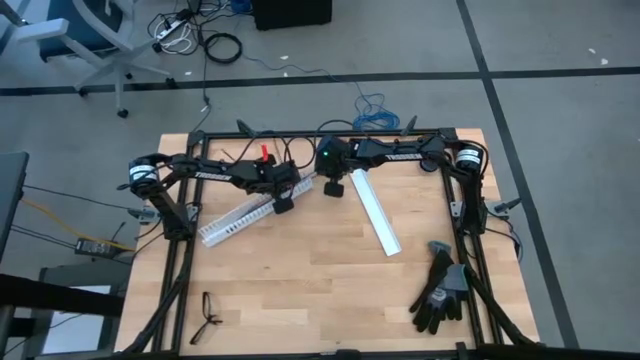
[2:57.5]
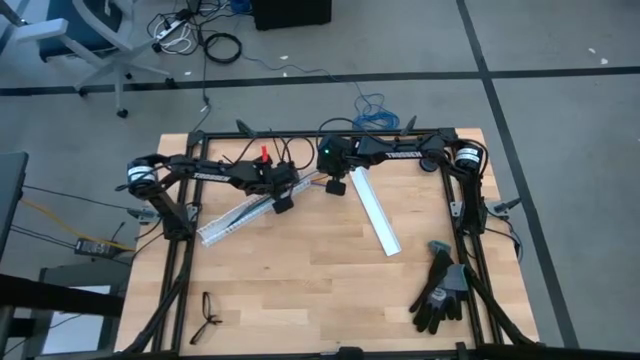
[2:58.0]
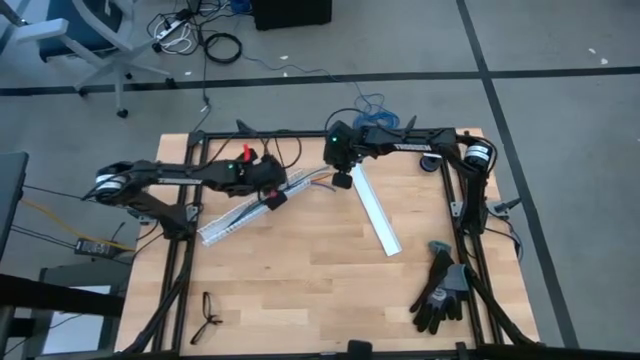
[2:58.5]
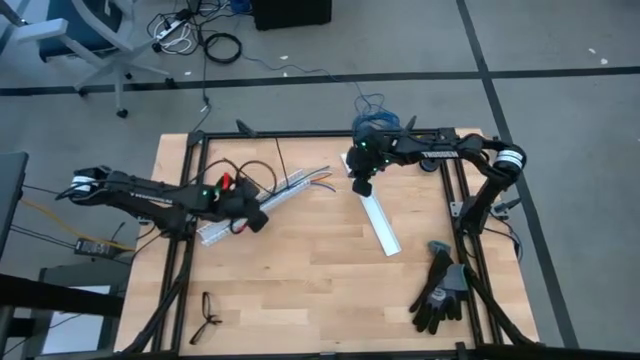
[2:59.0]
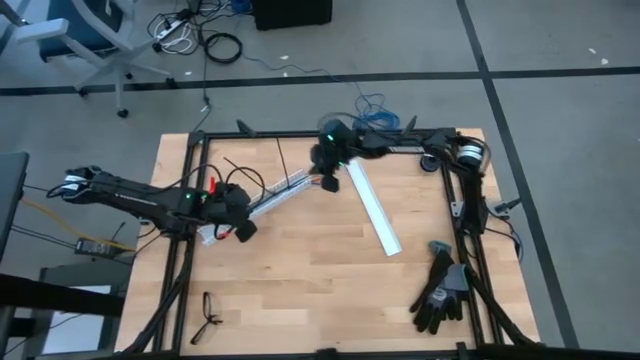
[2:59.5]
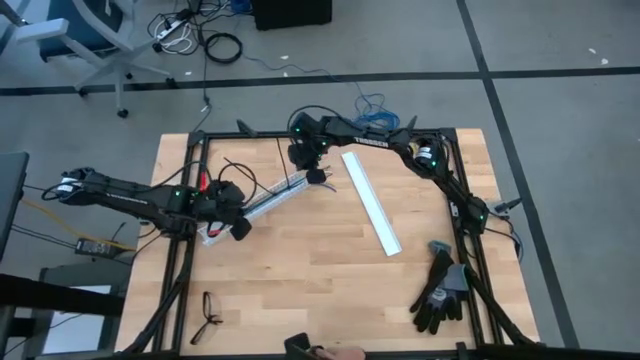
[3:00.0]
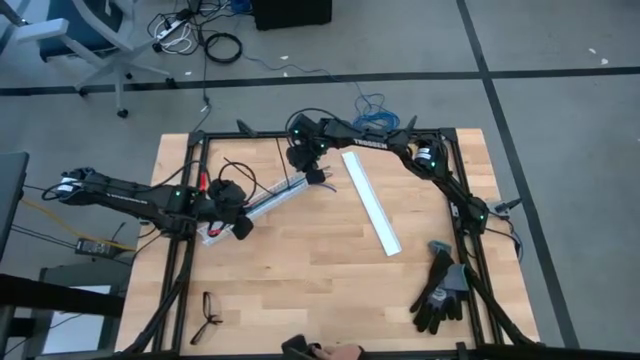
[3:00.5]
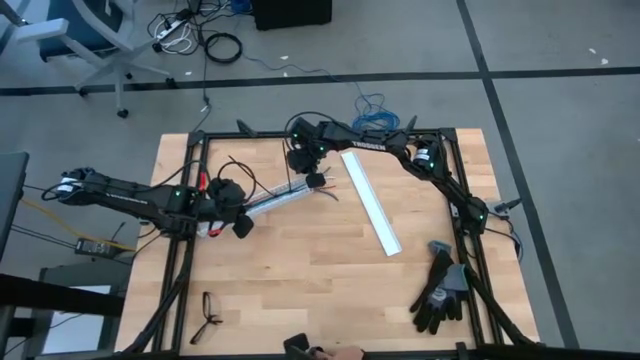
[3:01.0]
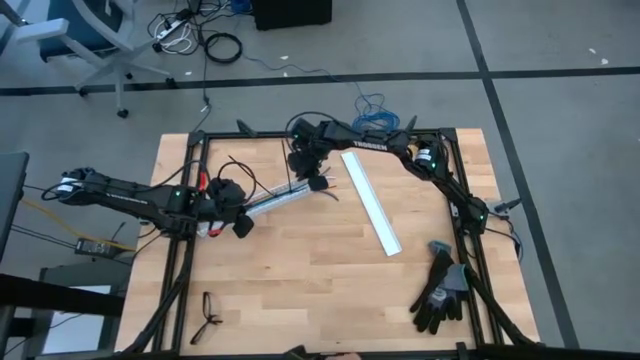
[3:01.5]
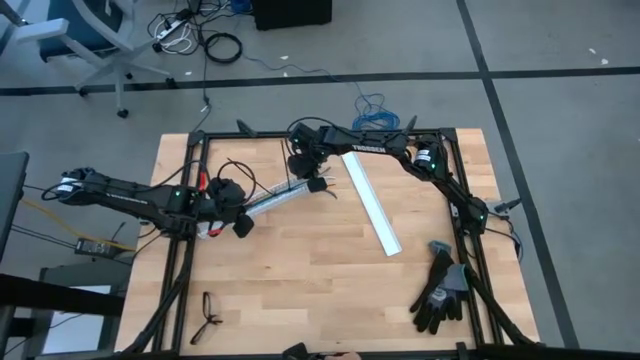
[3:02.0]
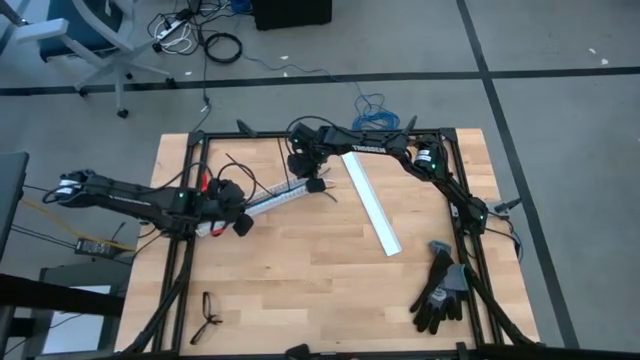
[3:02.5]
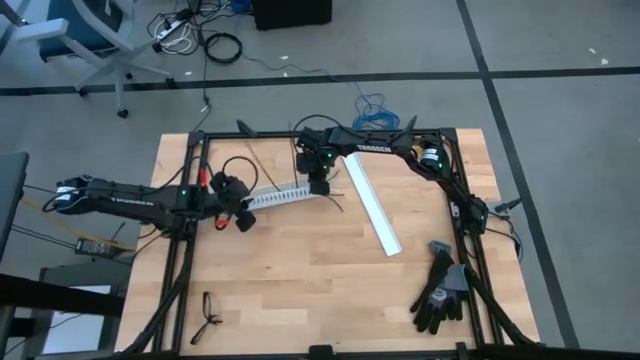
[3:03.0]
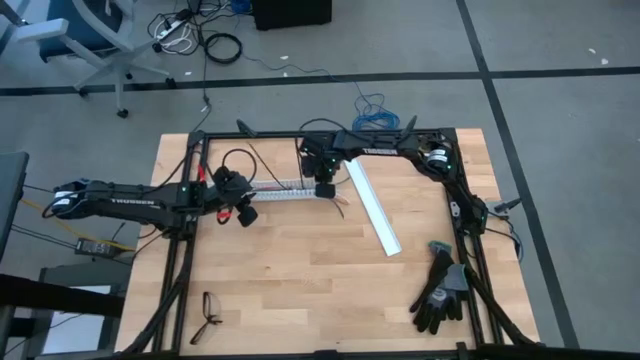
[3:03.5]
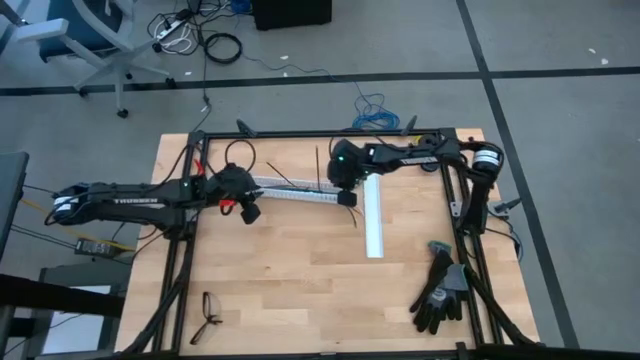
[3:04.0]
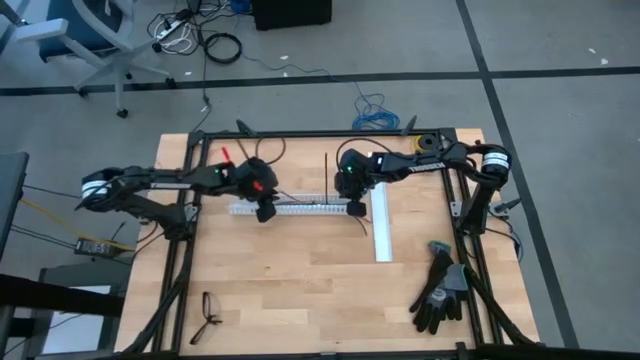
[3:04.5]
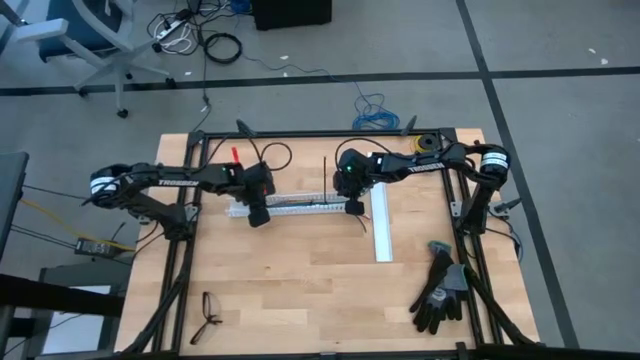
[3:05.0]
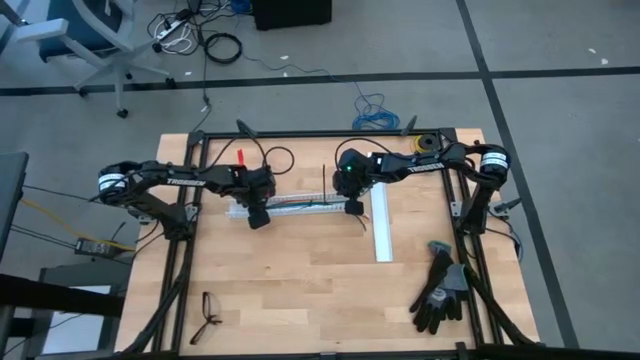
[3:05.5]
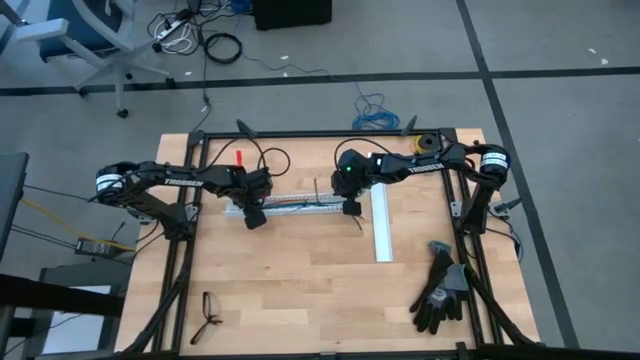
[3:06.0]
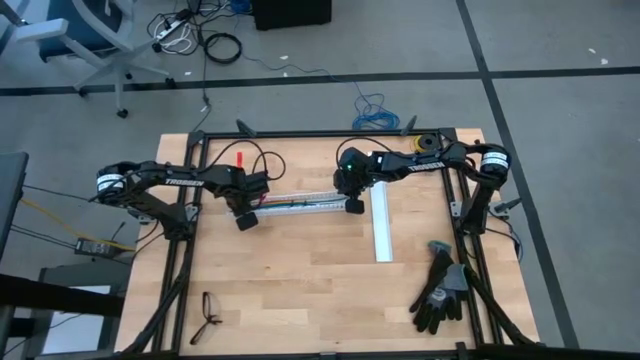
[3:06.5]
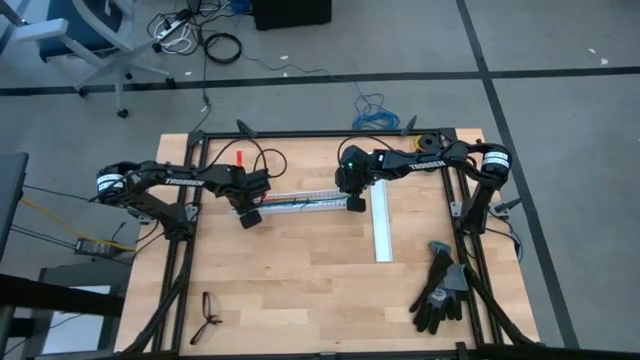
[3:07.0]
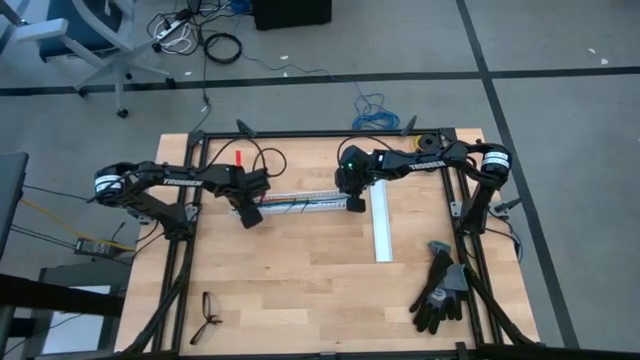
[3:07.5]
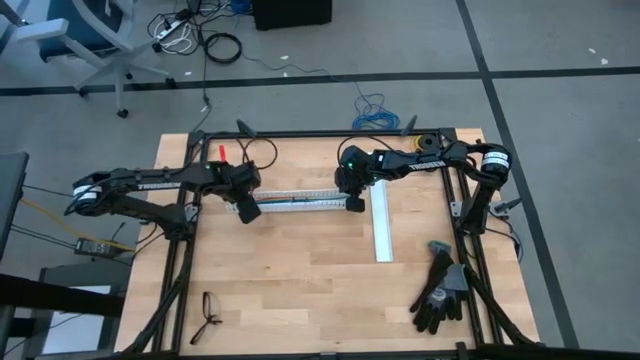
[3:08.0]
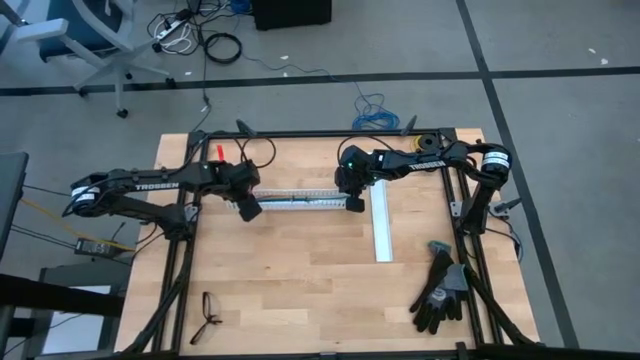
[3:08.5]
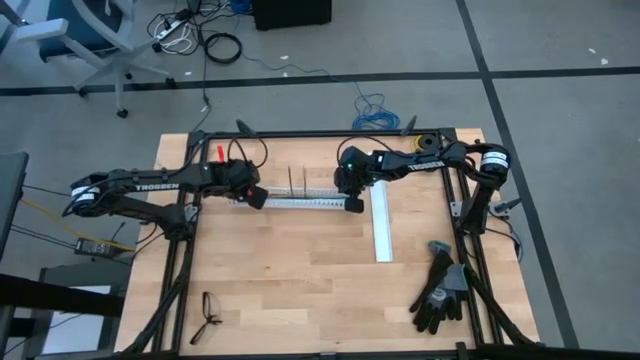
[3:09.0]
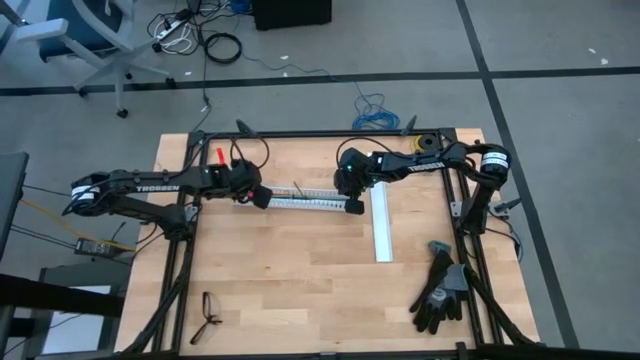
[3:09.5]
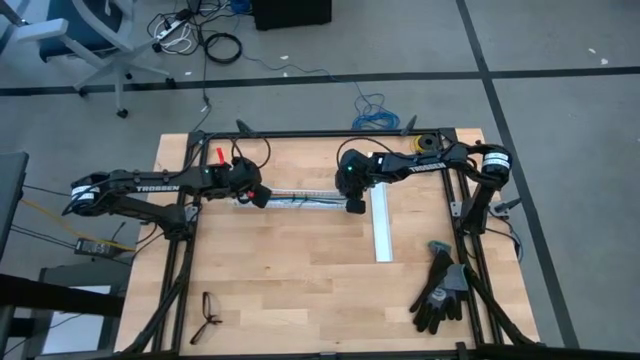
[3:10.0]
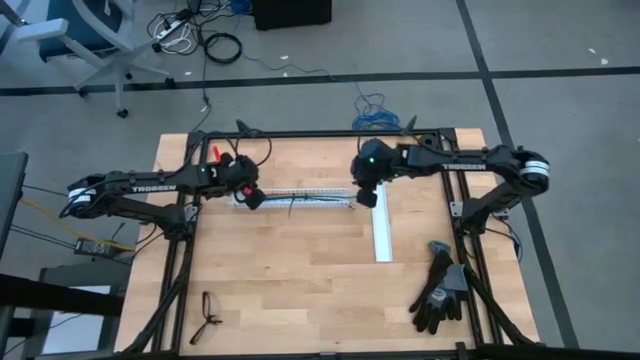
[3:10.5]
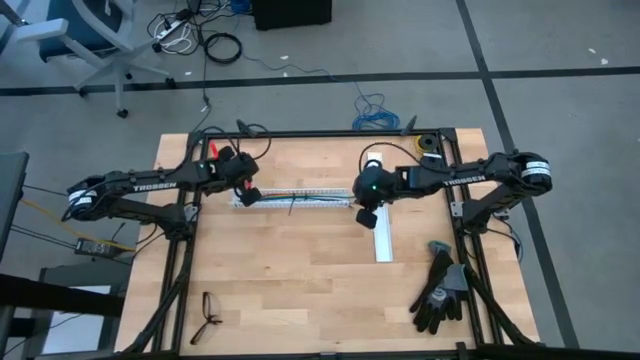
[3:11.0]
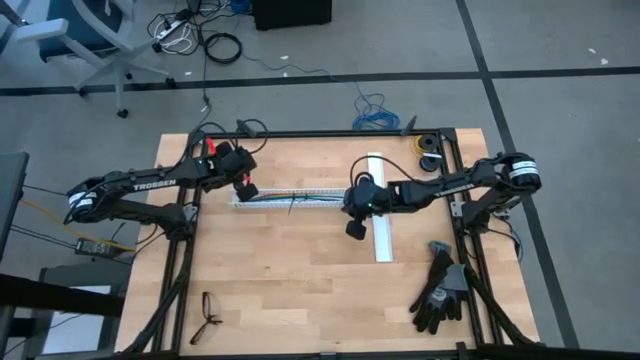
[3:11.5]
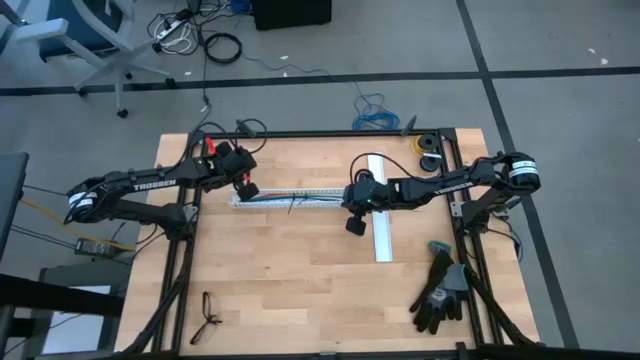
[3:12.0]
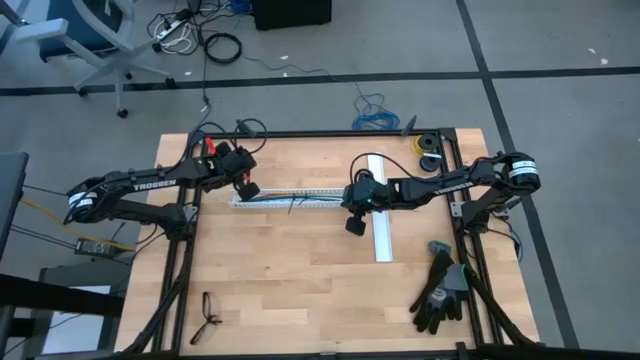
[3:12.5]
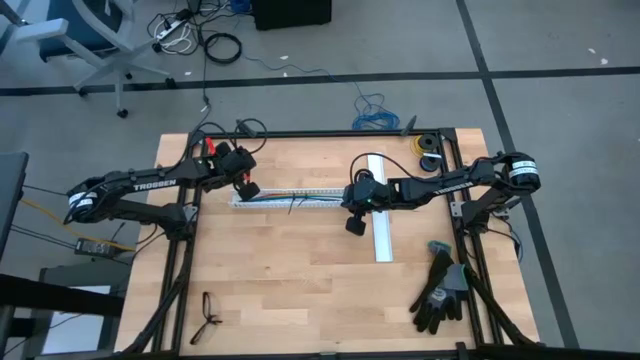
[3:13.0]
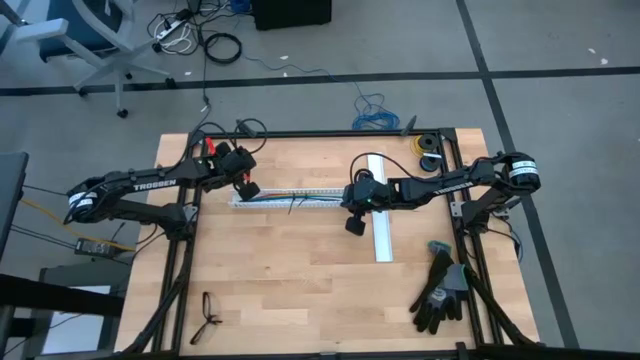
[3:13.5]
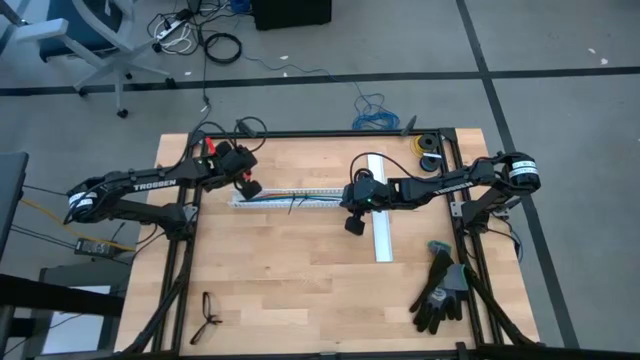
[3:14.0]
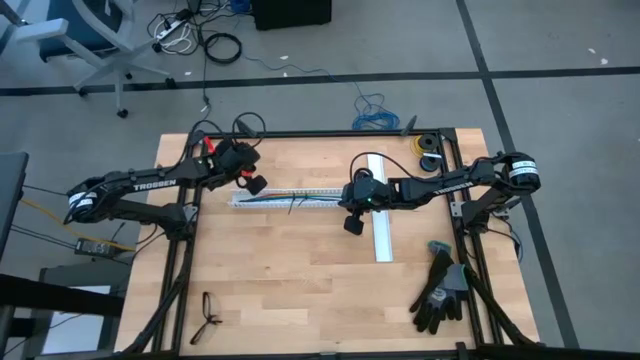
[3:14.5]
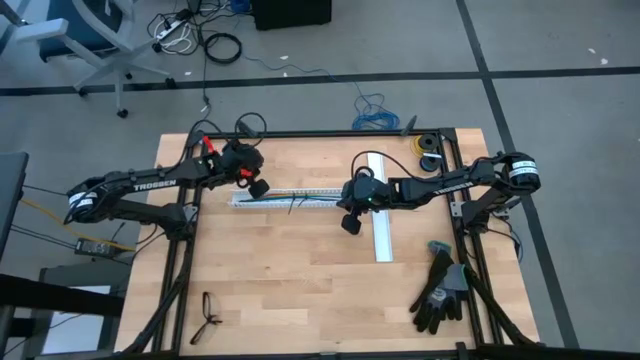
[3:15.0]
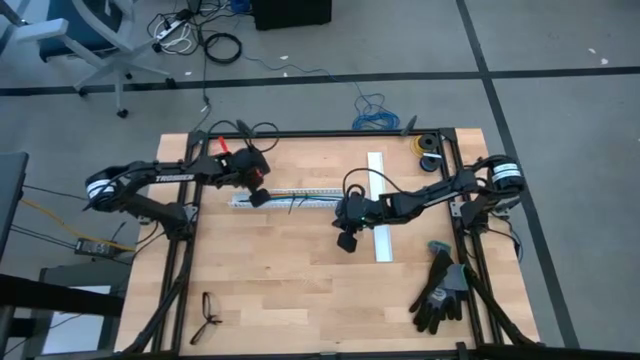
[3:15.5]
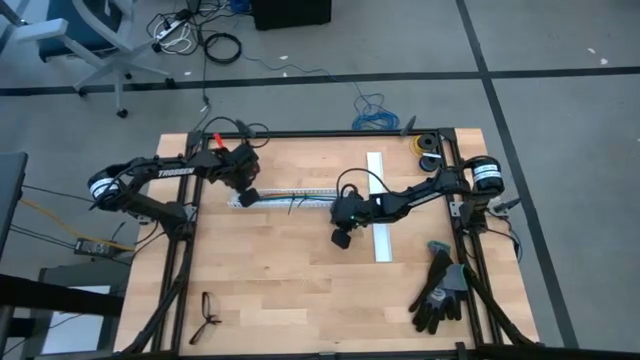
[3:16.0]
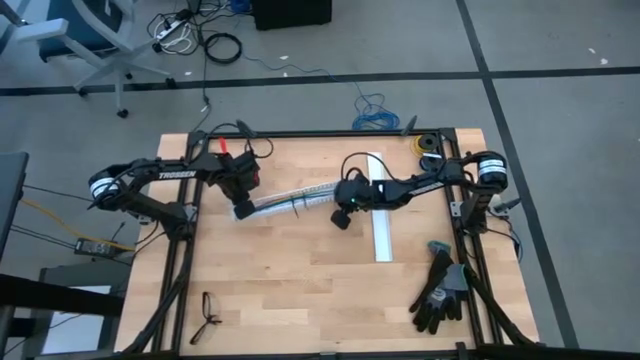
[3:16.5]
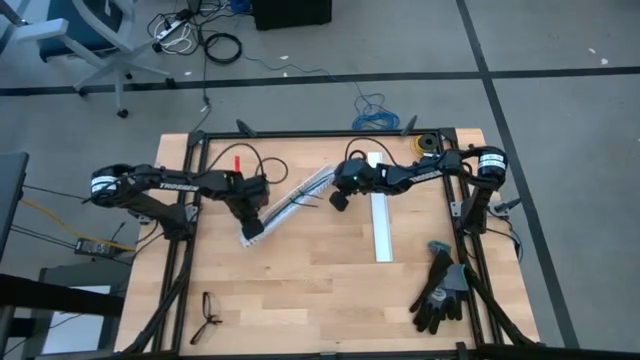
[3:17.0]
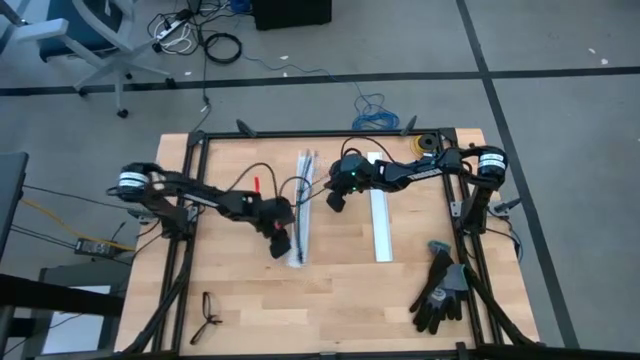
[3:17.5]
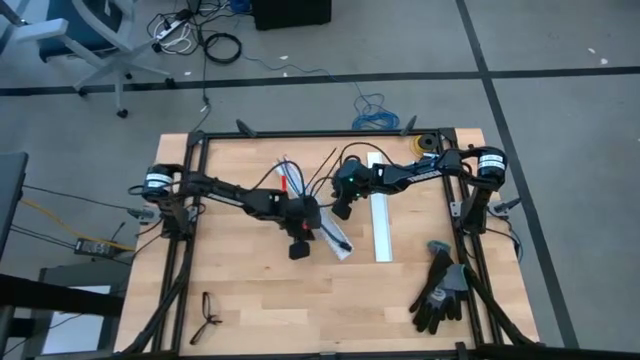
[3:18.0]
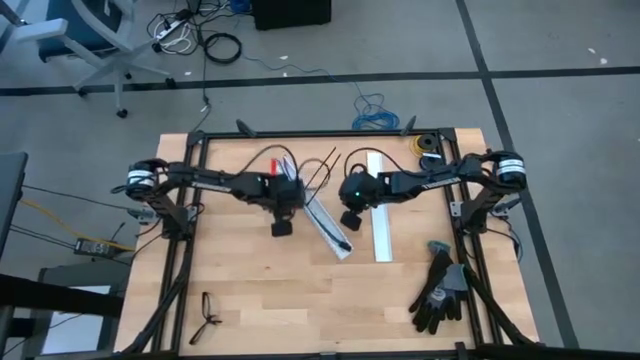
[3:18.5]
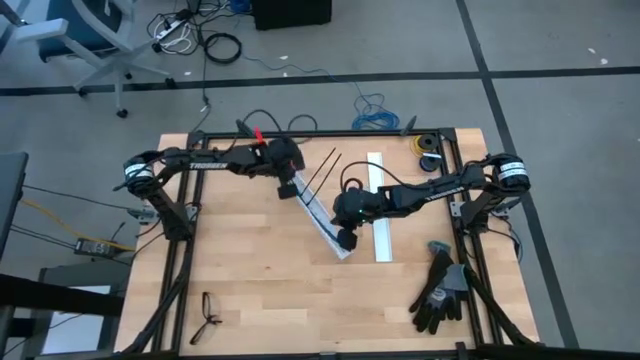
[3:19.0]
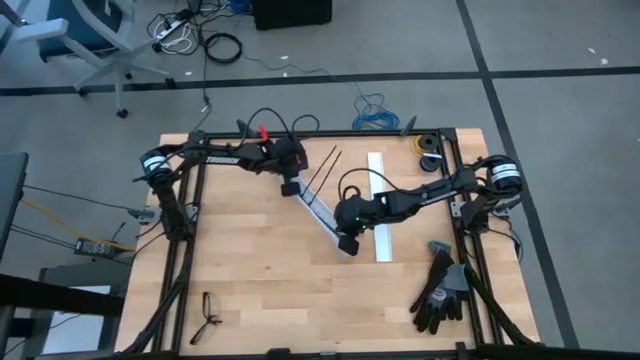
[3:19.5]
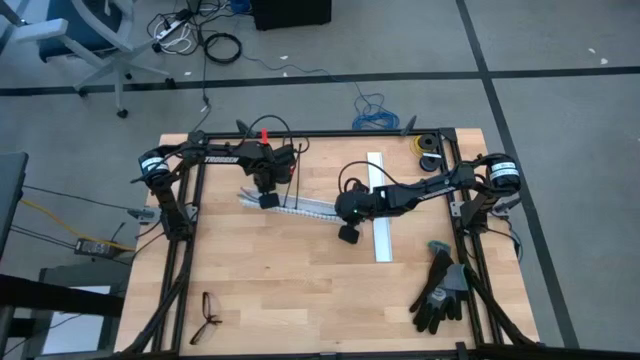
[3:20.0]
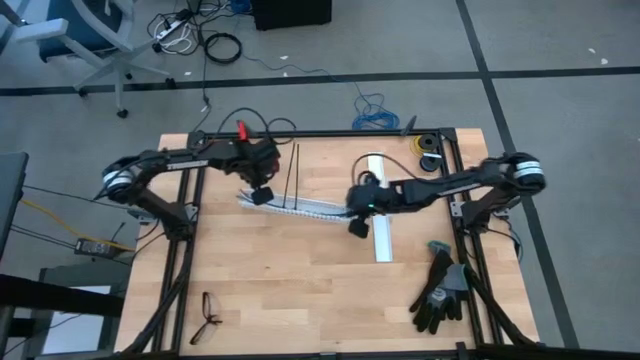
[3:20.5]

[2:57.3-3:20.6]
Task: Ziptie cables
Adjust the white cable duct on the table
